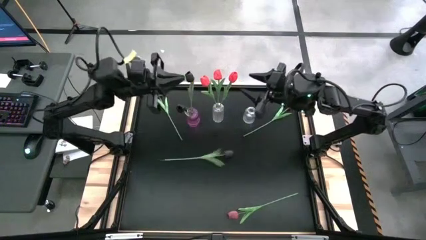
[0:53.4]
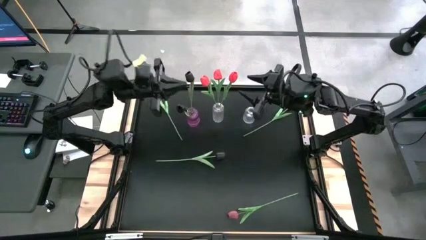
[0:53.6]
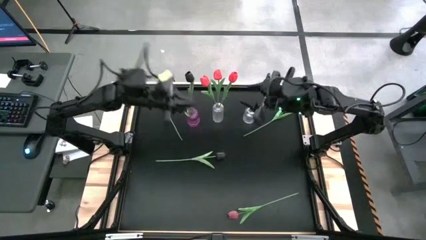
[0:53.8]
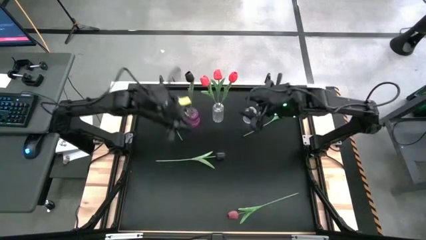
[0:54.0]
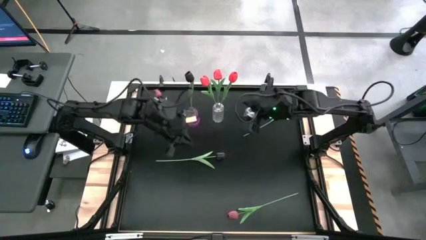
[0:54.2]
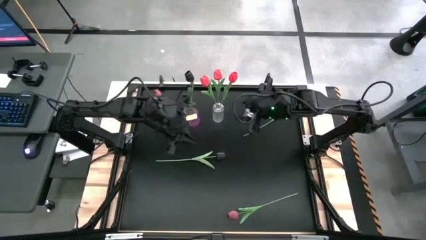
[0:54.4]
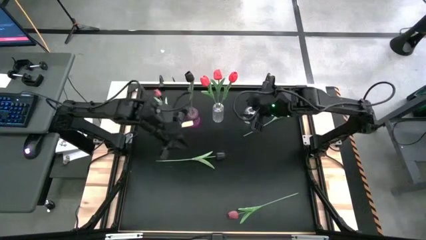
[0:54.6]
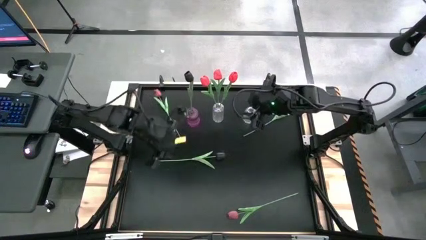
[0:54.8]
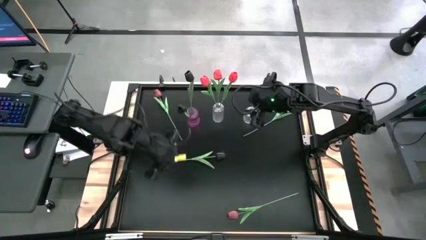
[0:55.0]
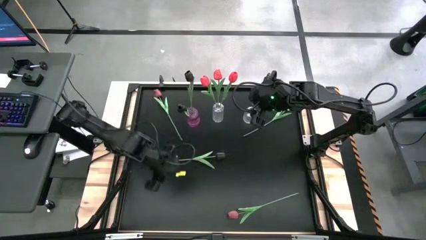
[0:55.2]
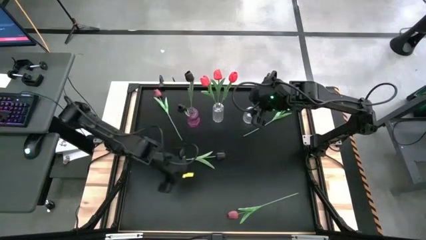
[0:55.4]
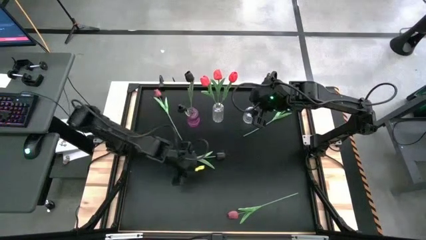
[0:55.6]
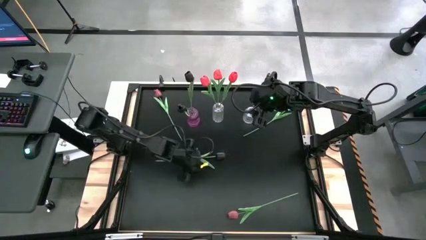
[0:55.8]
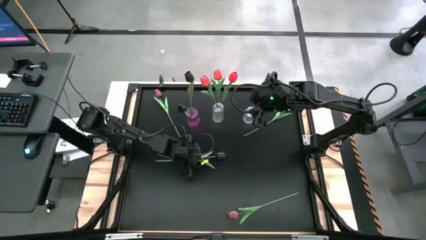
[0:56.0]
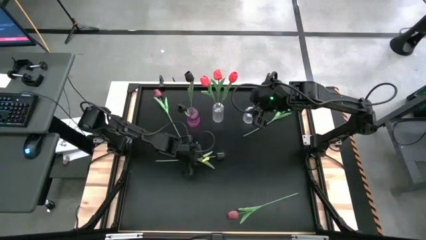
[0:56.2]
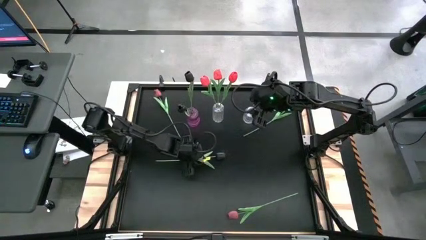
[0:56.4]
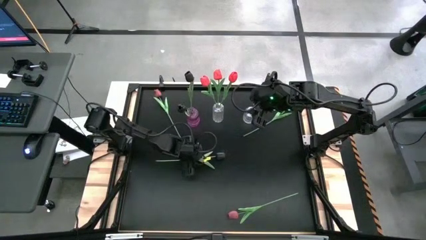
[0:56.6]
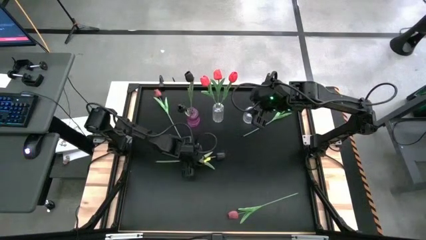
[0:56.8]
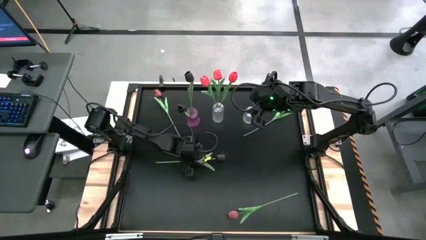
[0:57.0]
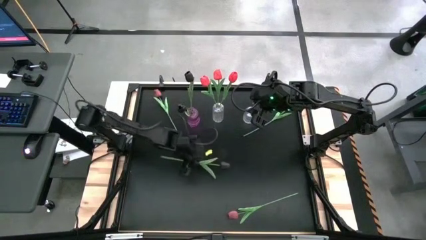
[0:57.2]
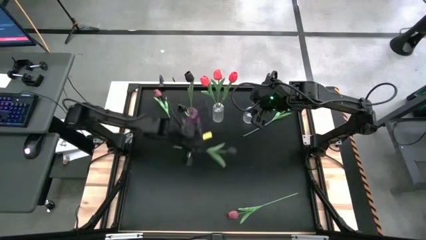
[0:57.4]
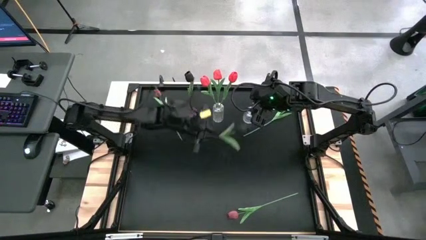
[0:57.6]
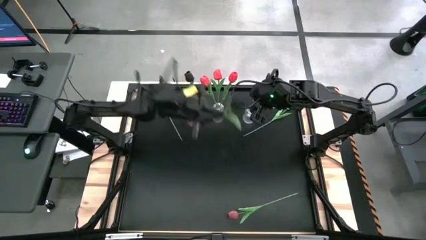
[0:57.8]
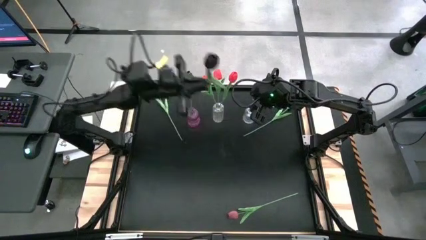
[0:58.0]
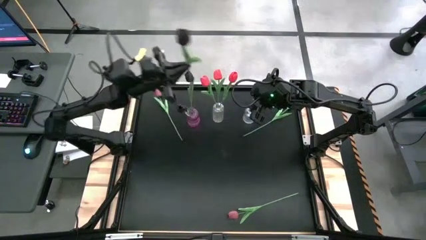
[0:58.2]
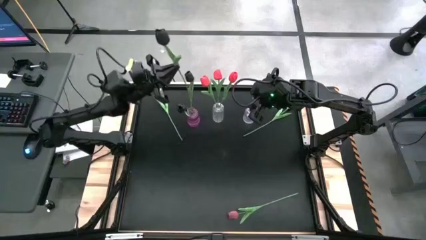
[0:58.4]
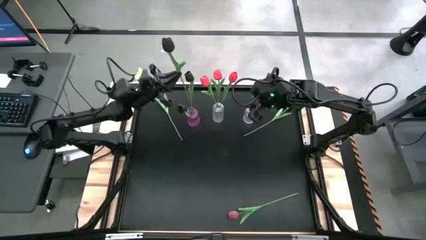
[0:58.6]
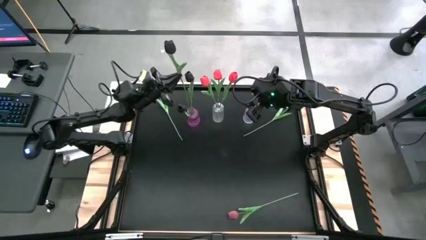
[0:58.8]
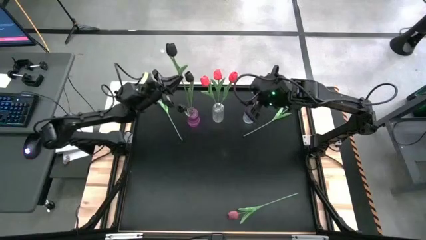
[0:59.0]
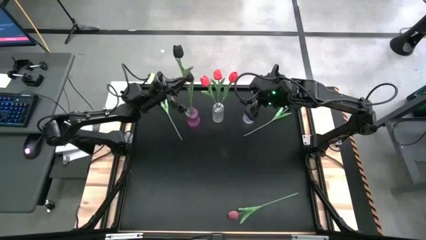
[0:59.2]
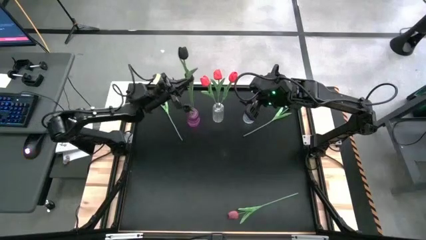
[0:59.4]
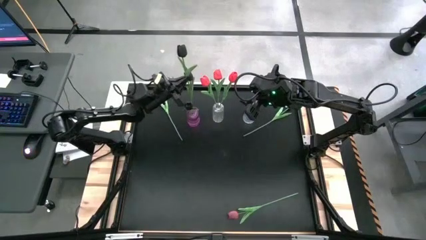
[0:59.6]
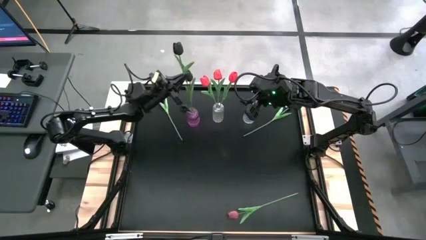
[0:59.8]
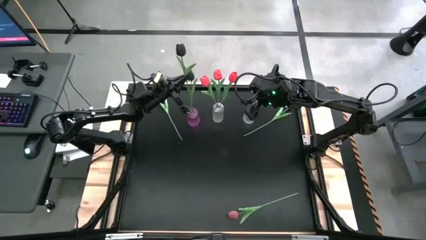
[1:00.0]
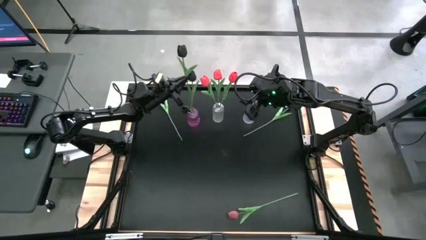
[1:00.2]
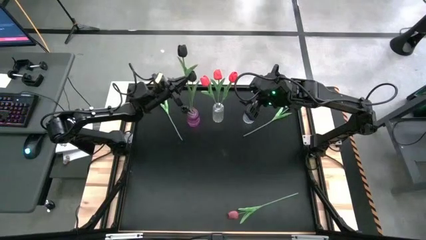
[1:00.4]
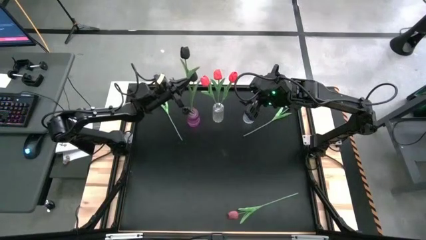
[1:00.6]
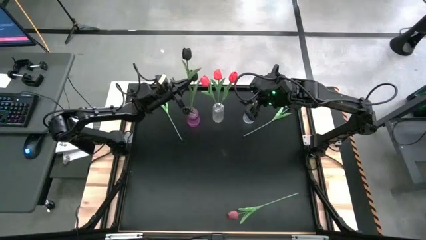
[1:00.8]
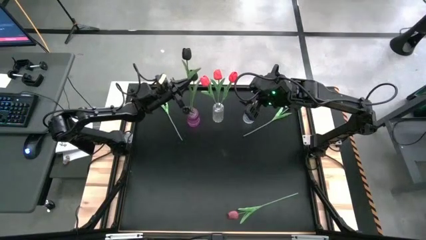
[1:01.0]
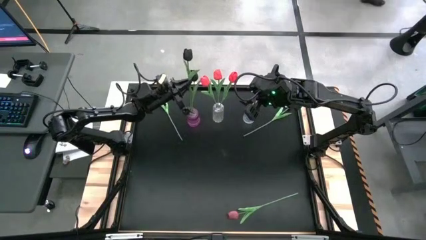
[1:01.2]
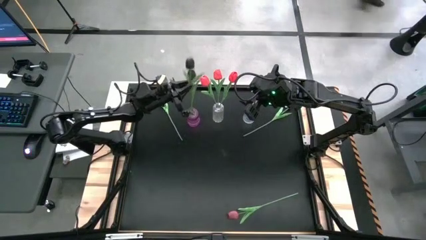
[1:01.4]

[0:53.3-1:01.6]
Task: Sort flowers into vase by color
Put the black flower into the violet flower vase

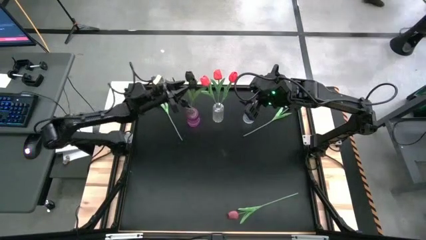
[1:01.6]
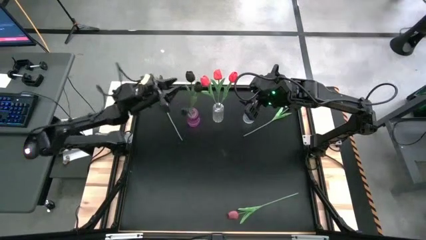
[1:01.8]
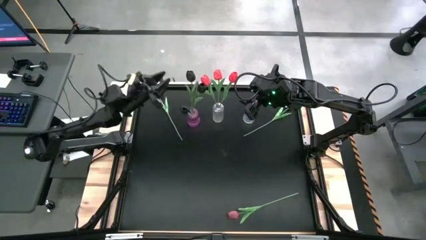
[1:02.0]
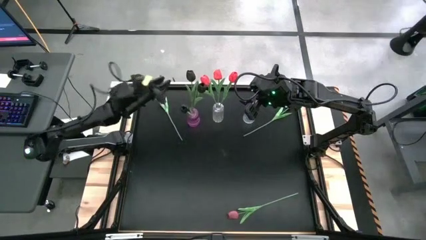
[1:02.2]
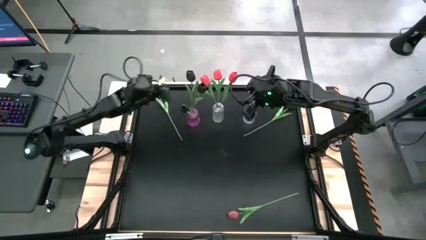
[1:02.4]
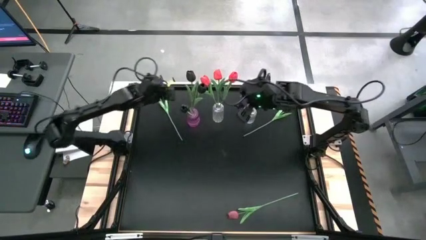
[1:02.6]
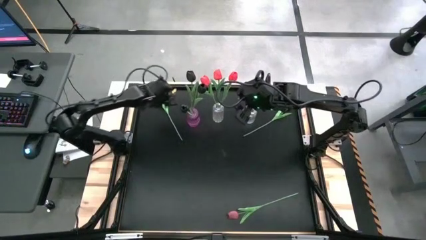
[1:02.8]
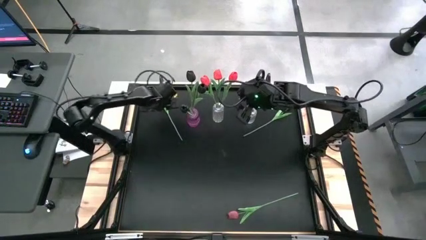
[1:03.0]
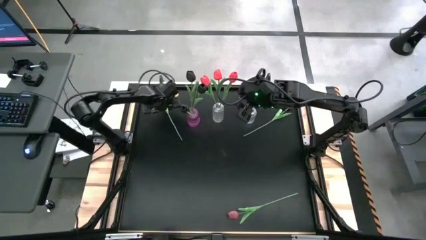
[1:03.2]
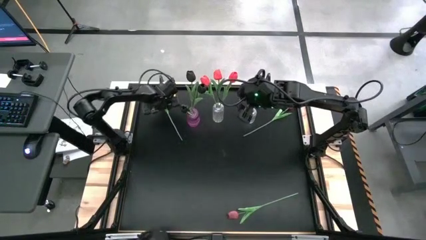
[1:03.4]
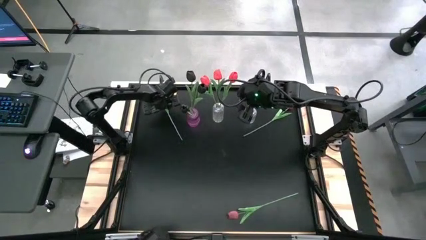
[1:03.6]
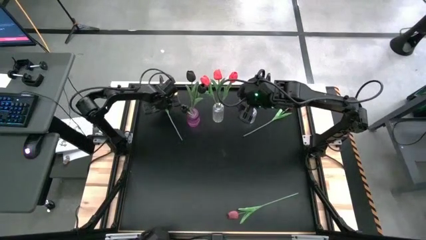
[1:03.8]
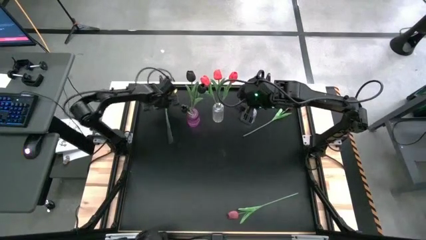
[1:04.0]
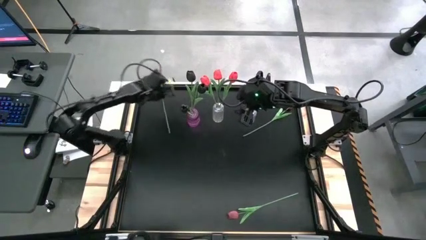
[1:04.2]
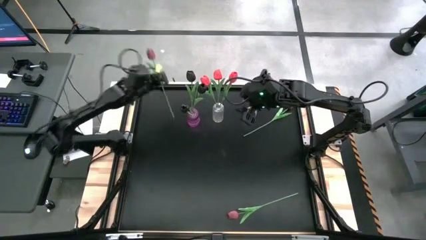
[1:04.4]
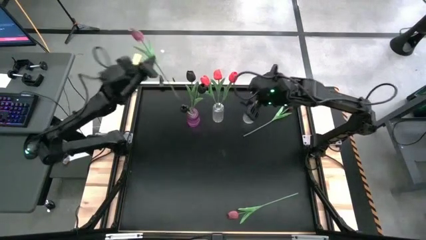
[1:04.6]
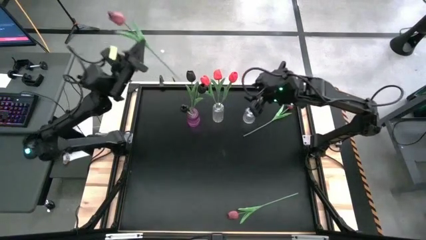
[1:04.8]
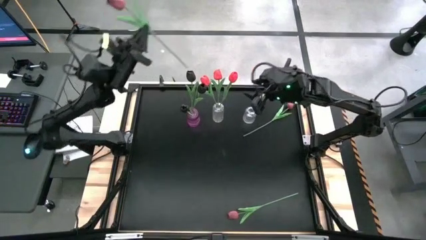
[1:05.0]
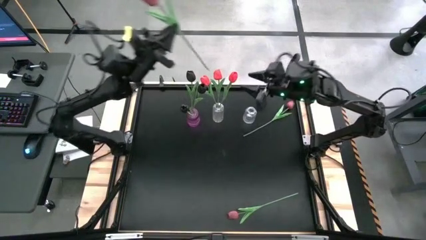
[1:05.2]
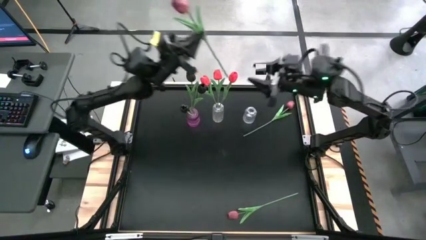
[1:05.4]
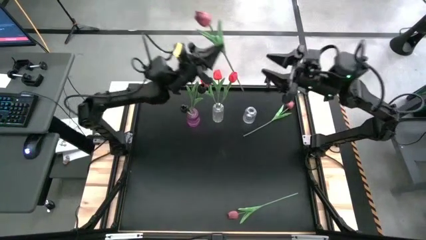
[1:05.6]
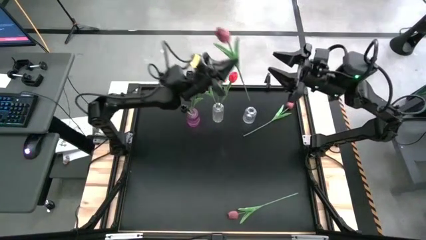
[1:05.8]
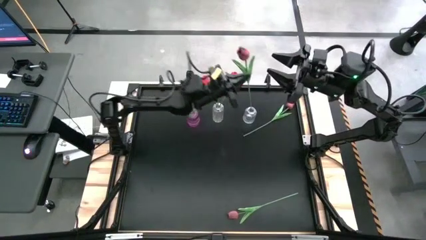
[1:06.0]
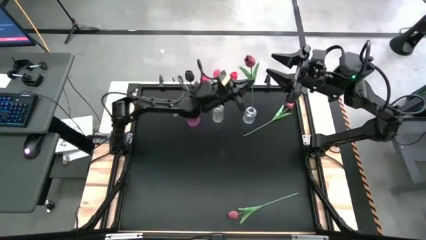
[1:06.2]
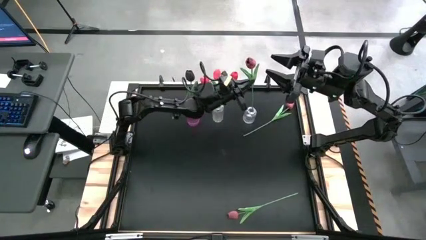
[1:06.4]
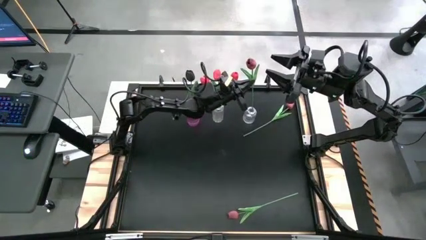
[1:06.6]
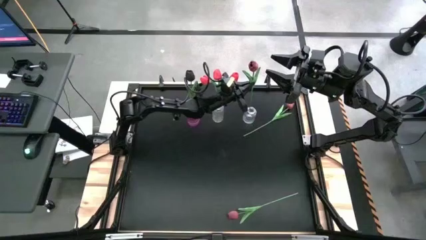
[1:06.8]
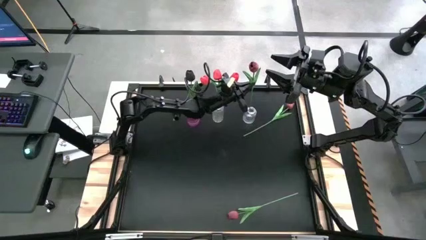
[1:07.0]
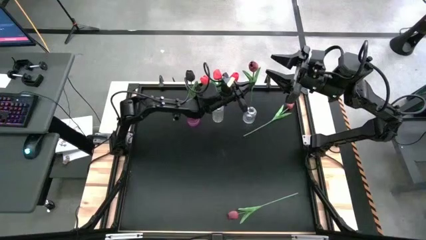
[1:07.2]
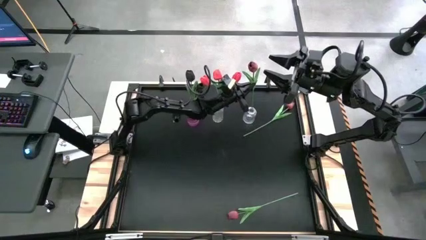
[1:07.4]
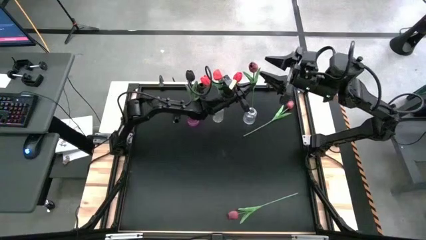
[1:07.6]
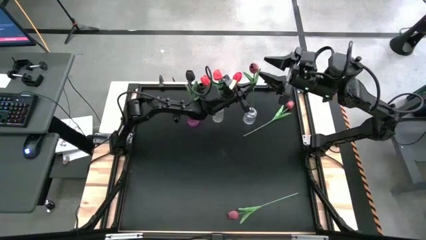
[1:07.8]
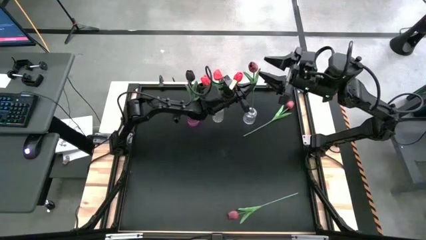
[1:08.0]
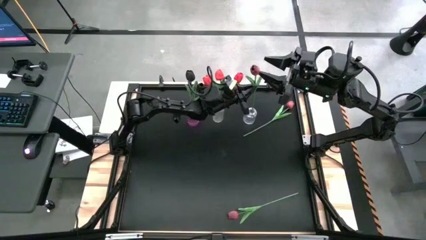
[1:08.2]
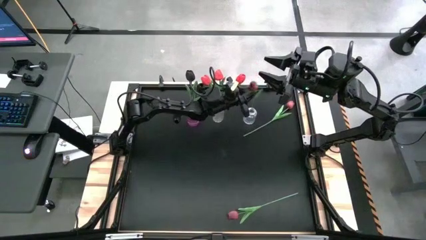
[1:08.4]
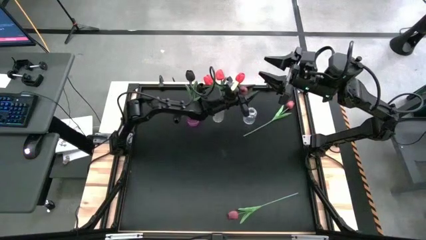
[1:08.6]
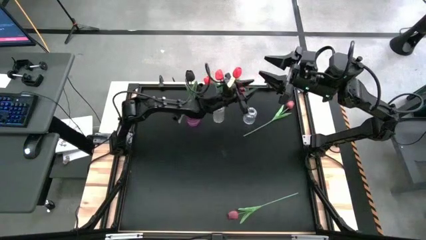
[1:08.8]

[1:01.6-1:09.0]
Put the top left dark red tulip into the right transparent flower vase
